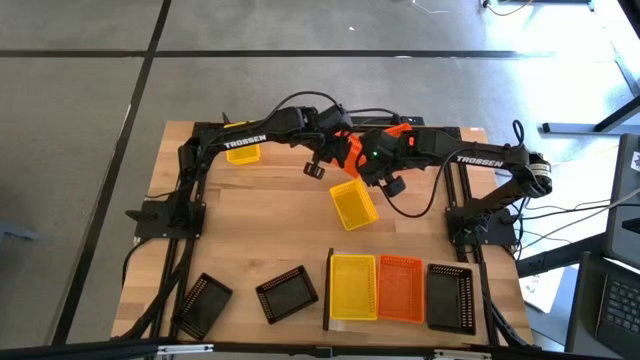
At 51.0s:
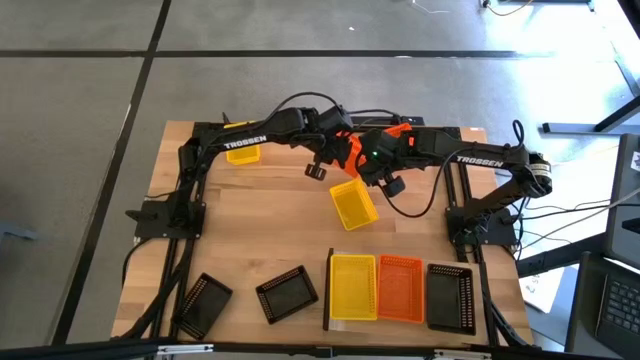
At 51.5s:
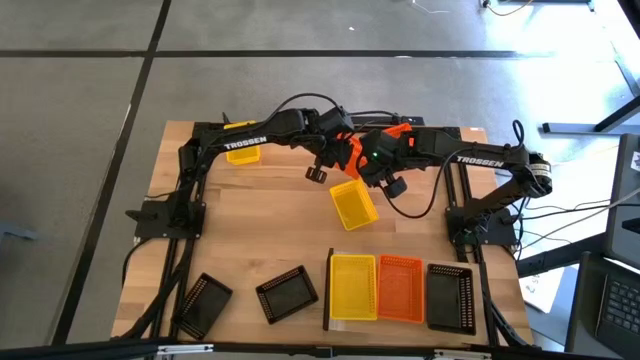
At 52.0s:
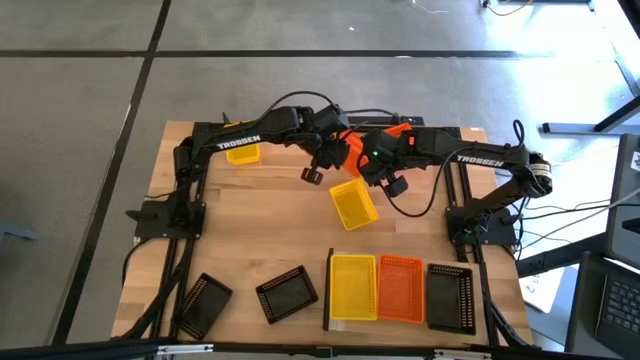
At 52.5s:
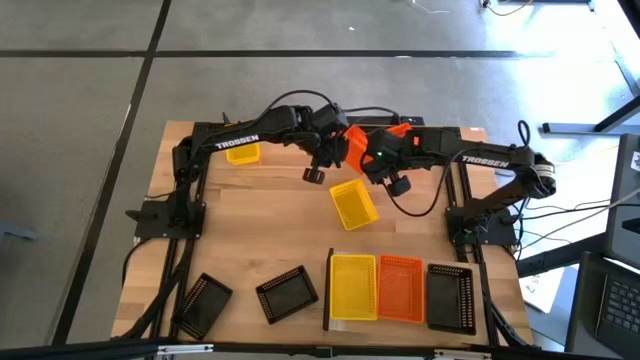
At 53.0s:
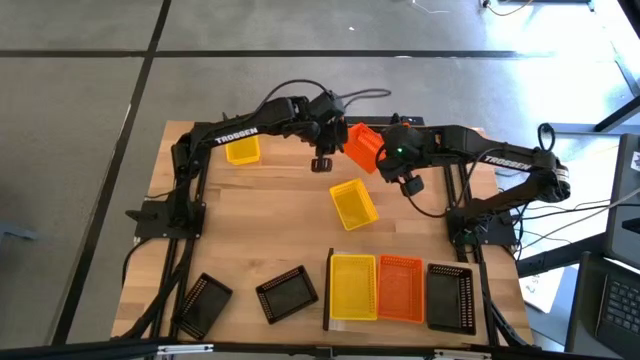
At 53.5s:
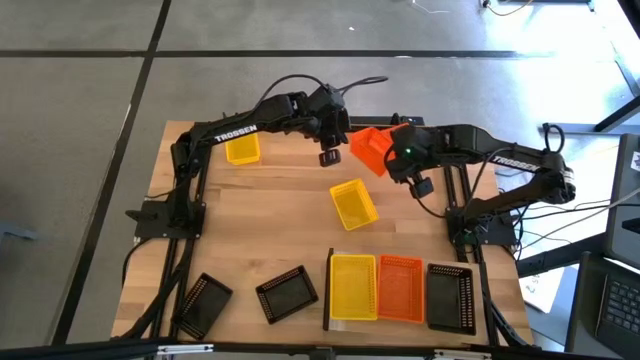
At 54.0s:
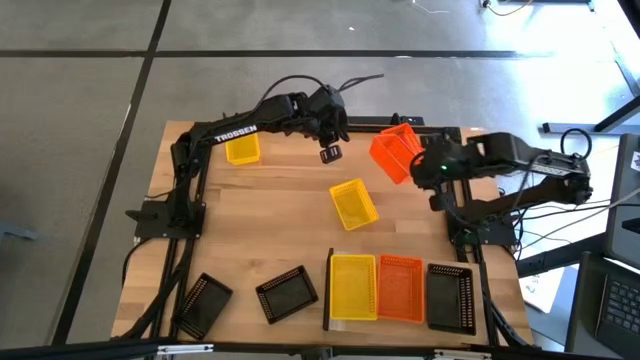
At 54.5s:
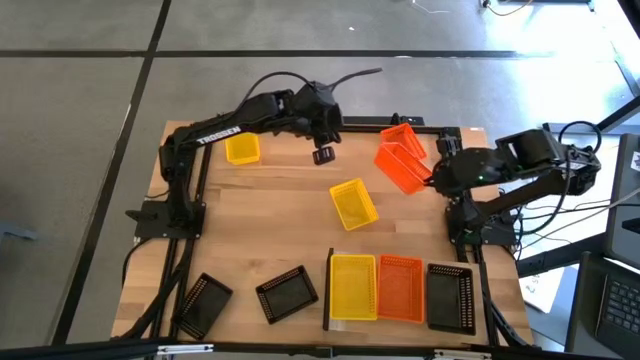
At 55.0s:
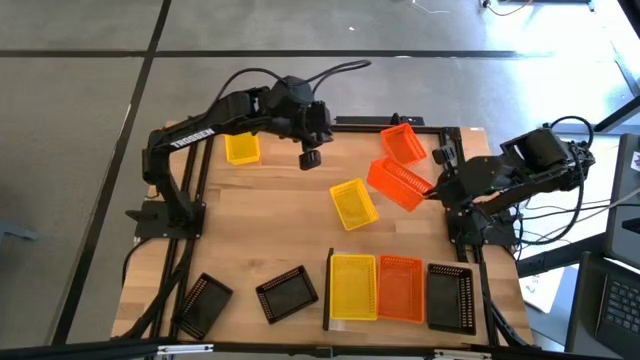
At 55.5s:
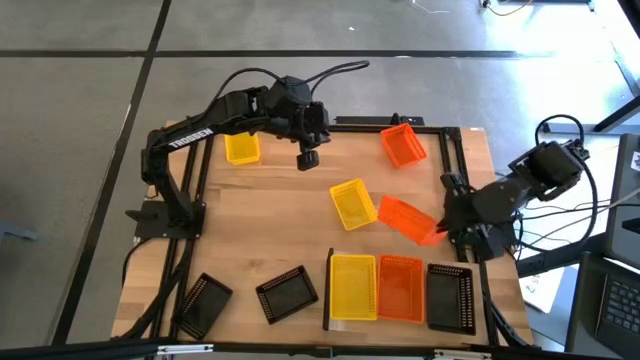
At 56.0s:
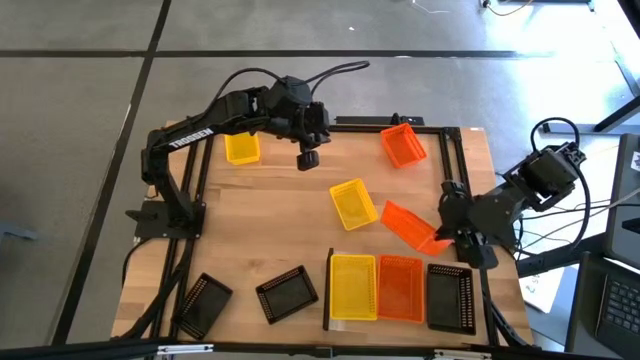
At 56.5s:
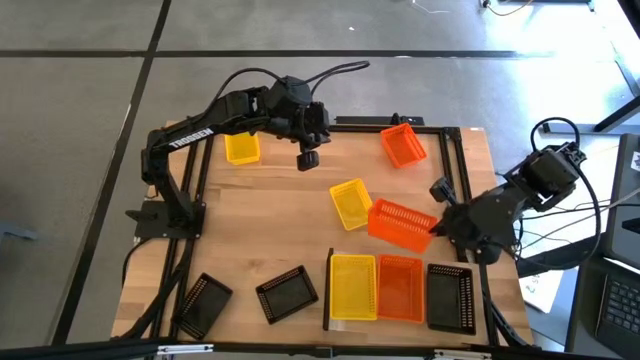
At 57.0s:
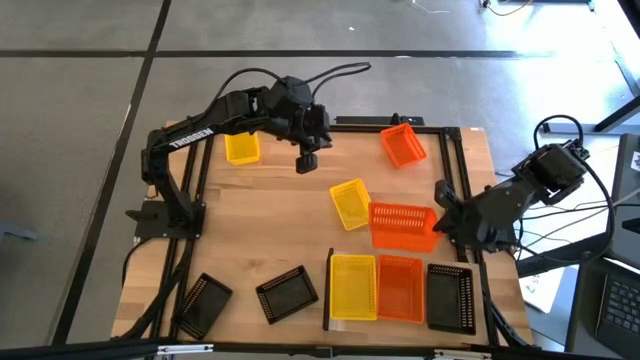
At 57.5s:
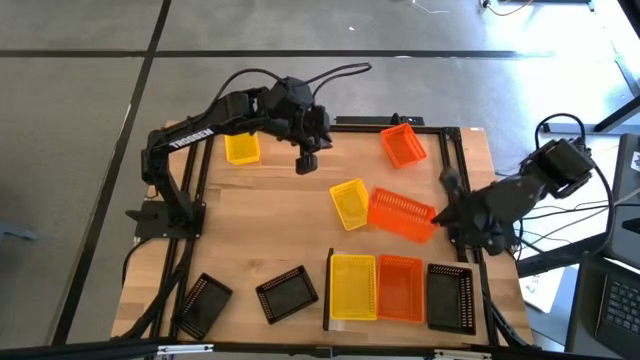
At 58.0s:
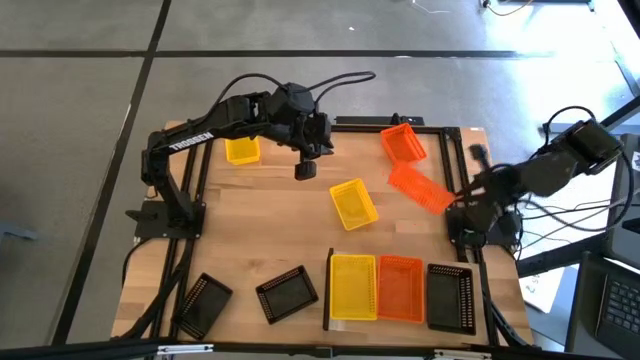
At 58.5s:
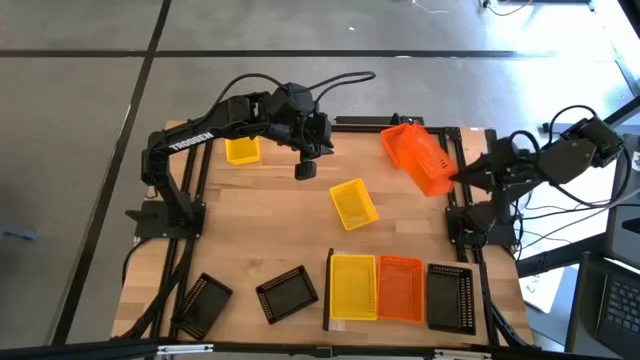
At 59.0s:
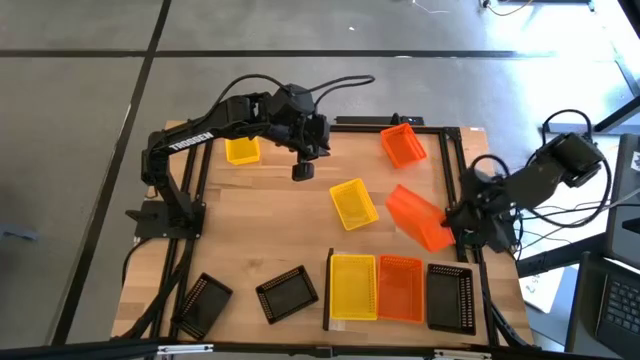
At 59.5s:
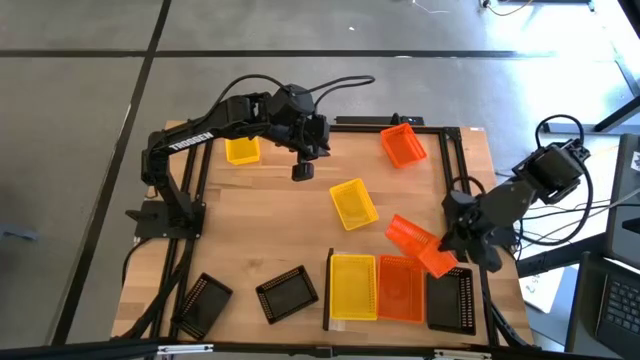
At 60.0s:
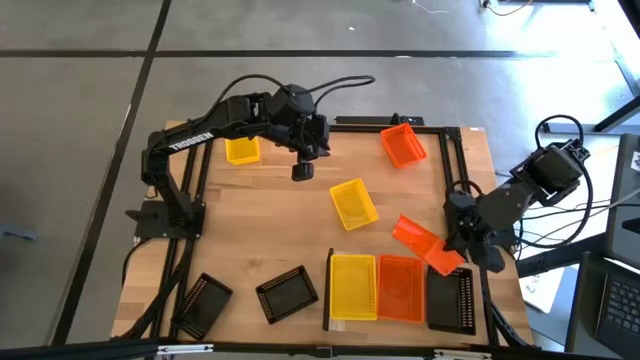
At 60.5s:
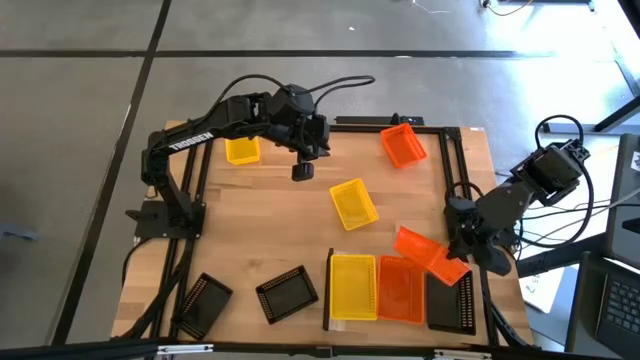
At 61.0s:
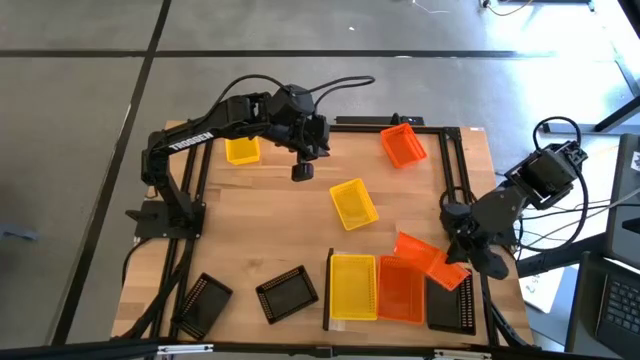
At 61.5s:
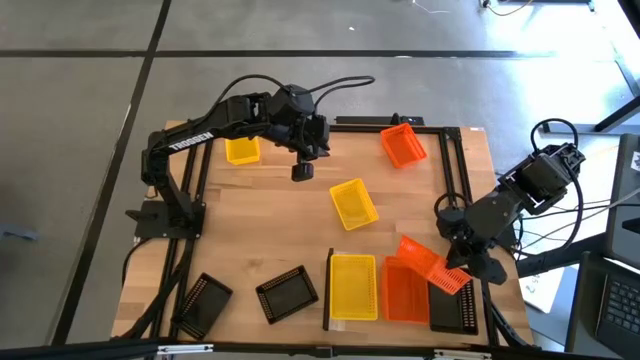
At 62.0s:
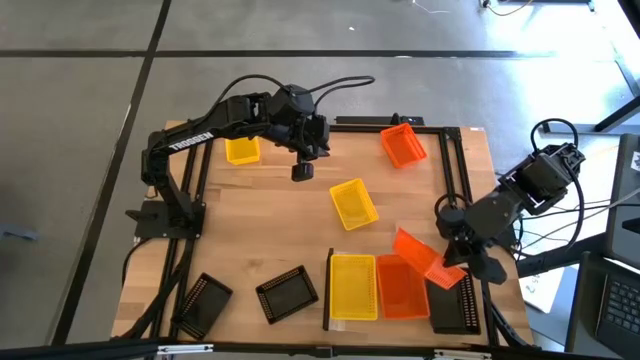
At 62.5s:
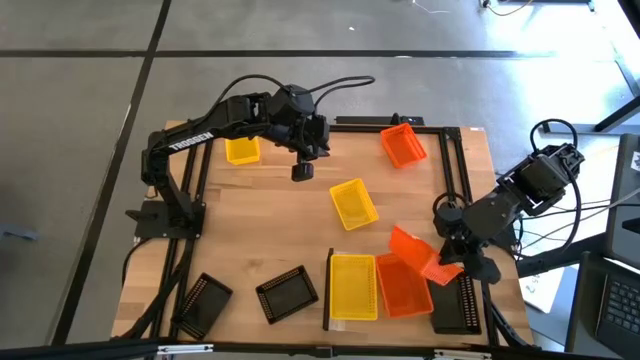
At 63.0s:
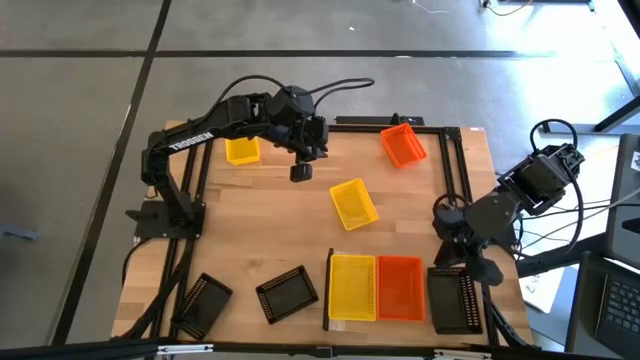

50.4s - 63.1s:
Task: Stack baskets on shelf by color
Stack the left orange bin on top of the orange bin

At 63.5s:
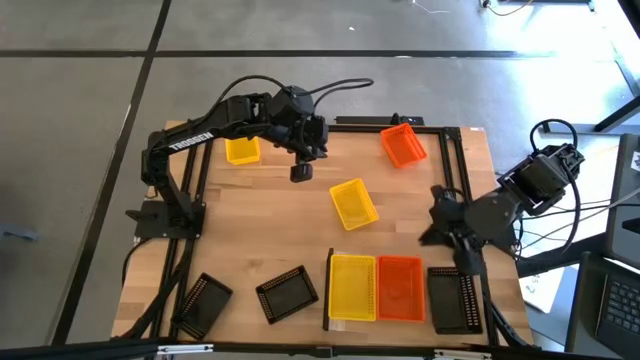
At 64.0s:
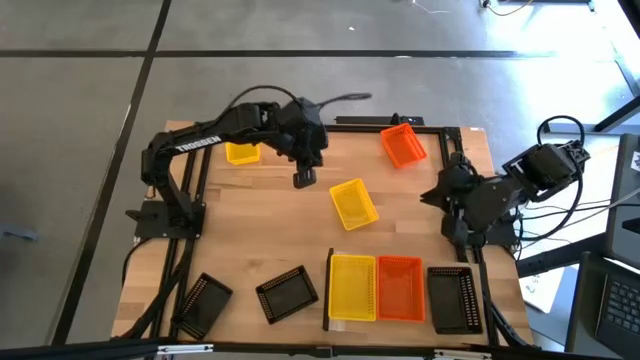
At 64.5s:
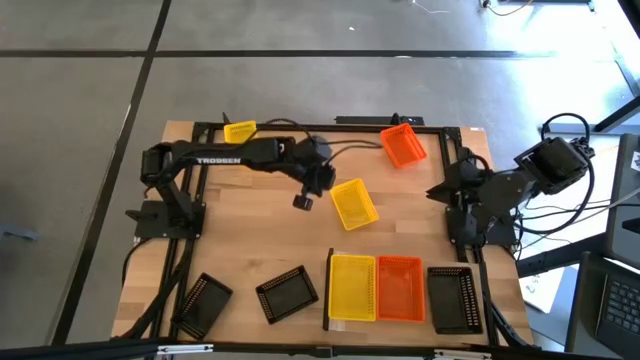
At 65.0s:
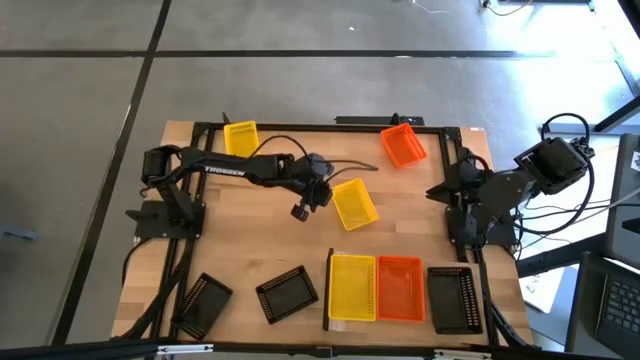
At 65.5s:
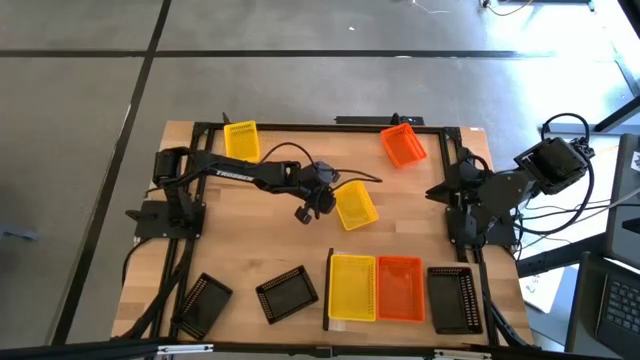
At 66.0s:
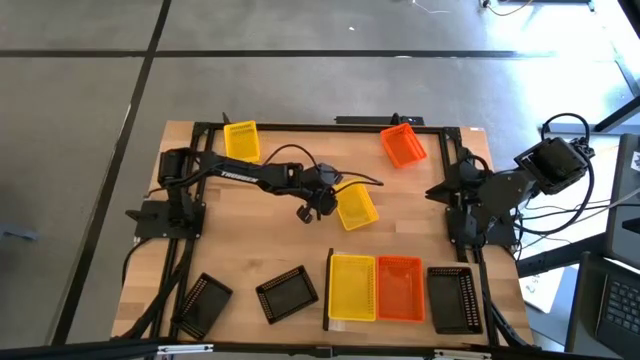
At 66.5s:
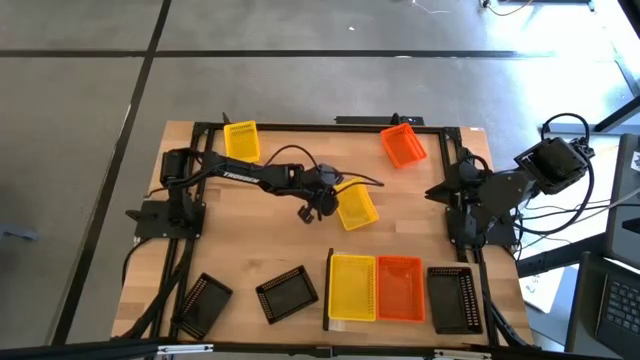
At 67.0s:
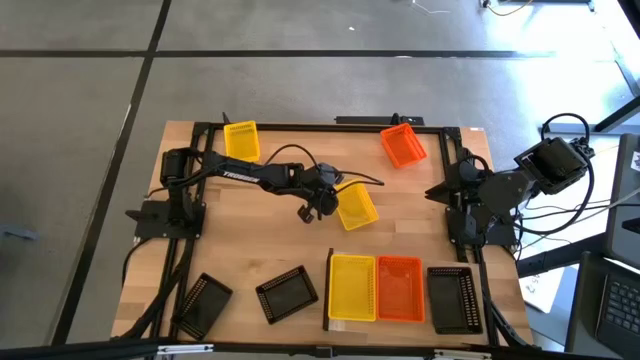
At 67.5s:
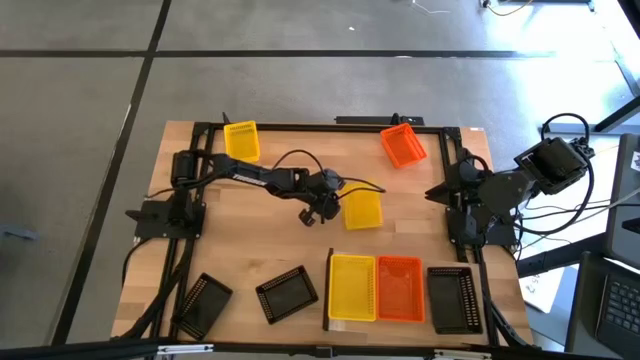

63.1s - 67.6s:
Stack the bottom yellow bin on top of the yellow bin

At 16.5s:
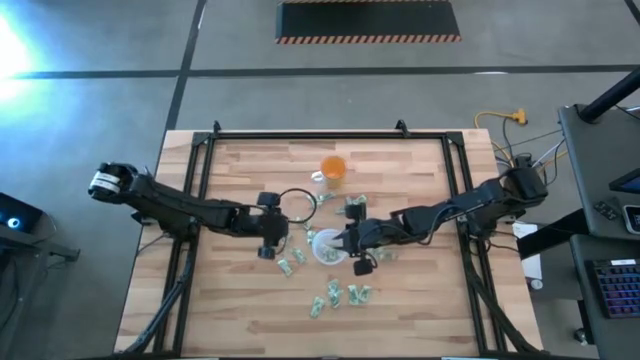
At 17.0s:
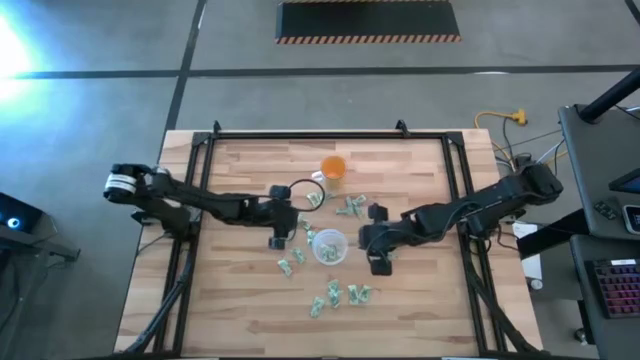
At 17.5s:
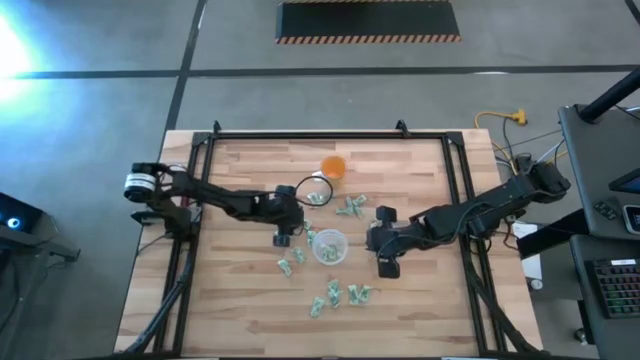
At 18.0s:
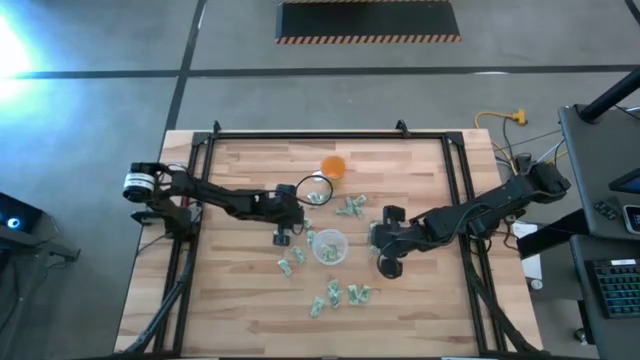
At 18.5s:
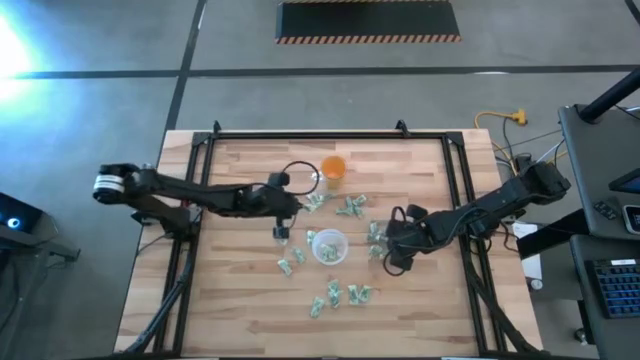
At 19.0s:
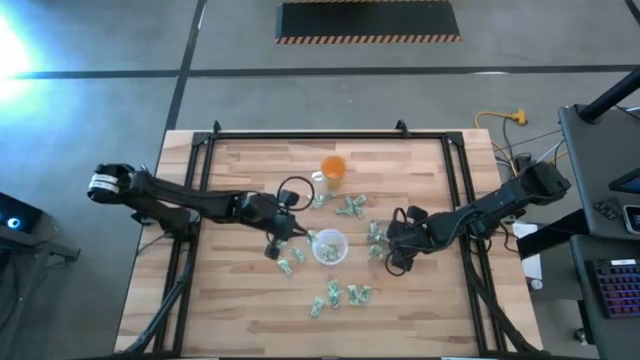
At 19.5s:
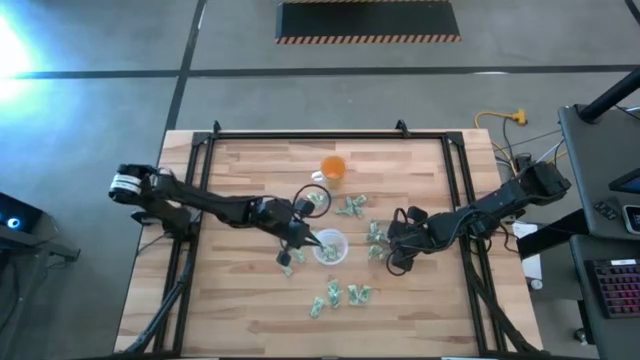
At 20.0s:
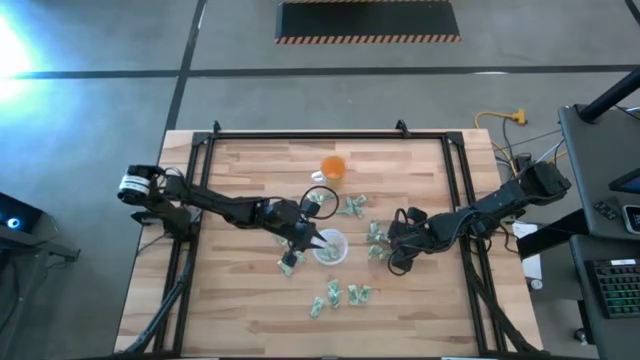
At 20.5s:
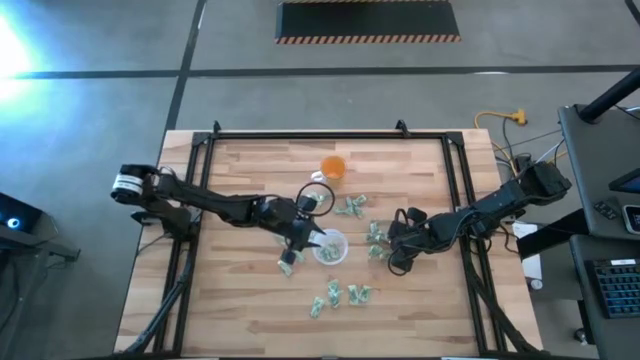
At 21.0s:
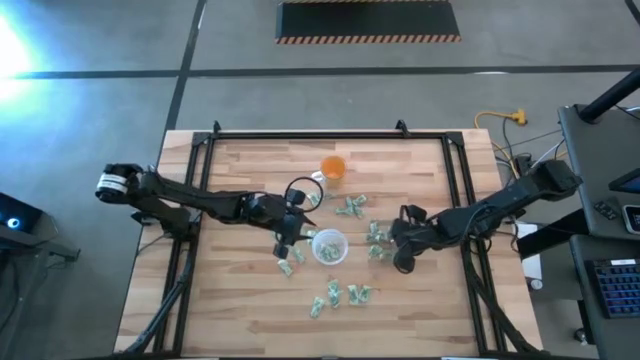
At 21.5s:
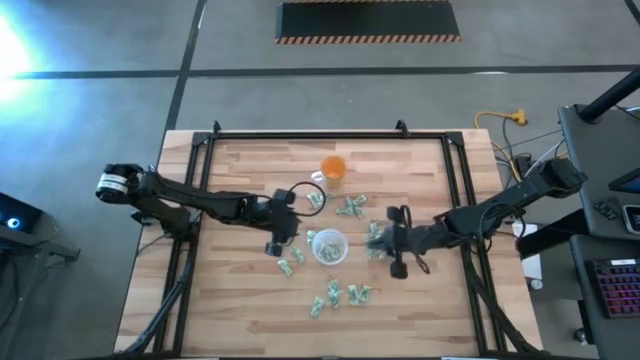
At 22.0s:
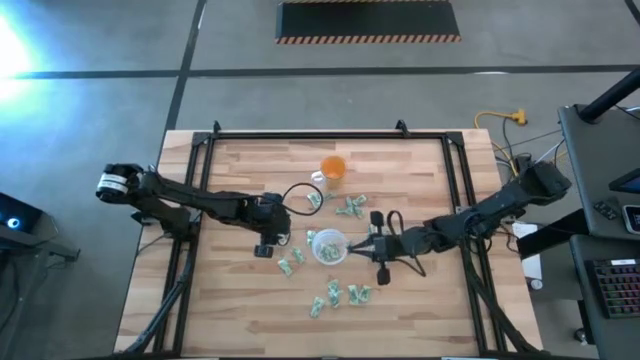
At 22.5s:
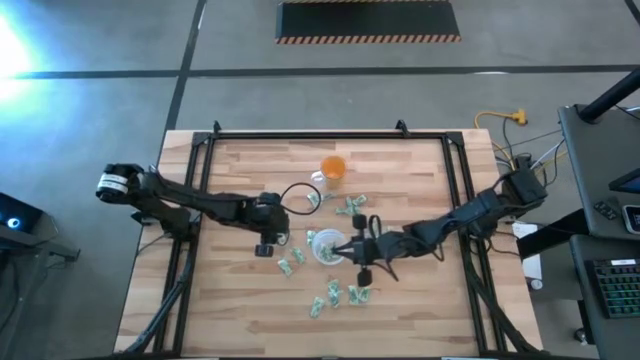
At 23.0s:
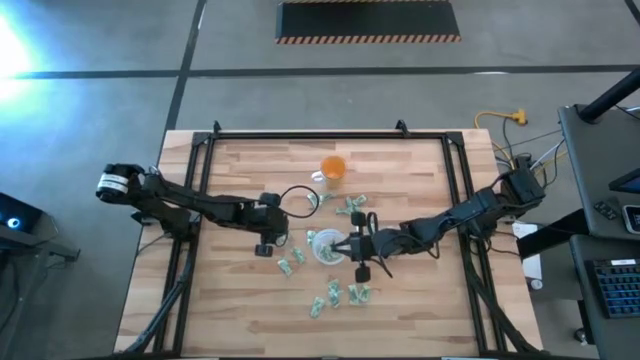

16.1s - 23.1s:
Task: Pick and place Stevia / Truvia into bins
Put the green stevia packet into the transparent container
